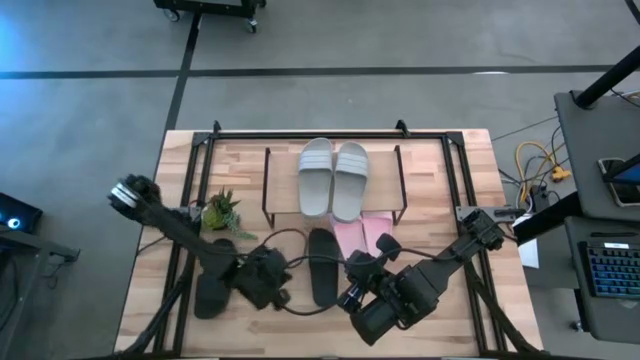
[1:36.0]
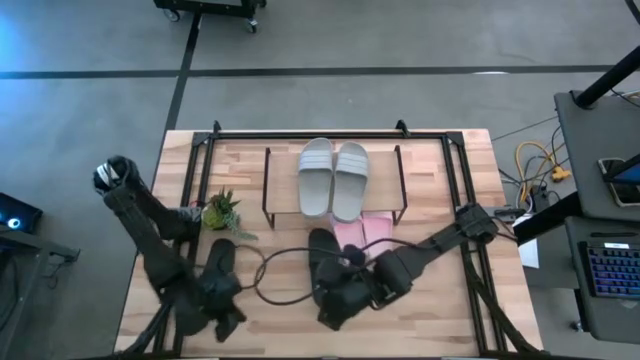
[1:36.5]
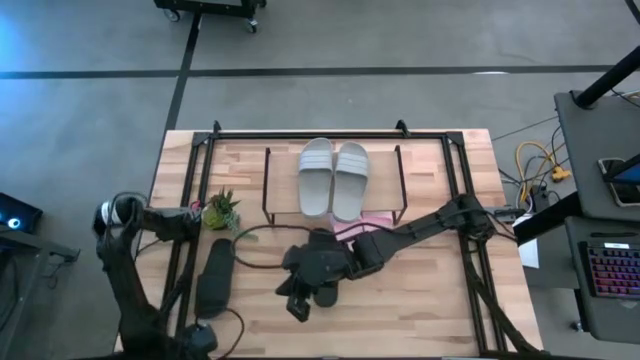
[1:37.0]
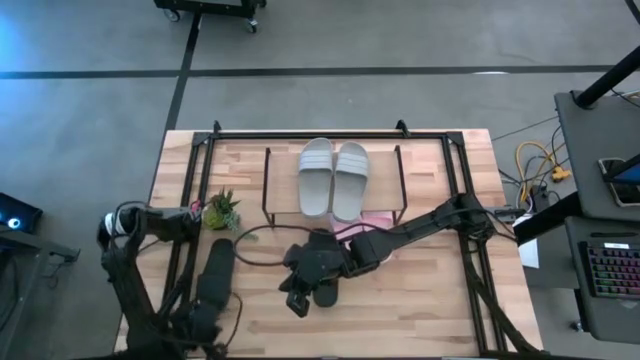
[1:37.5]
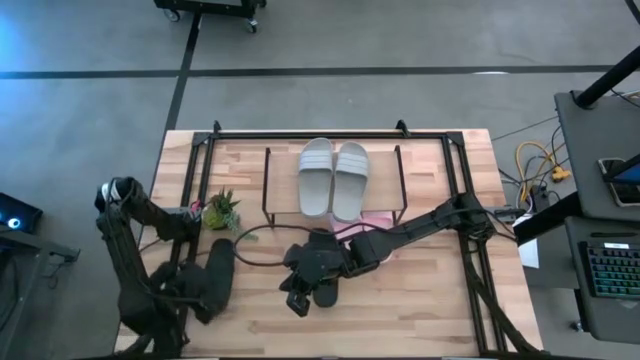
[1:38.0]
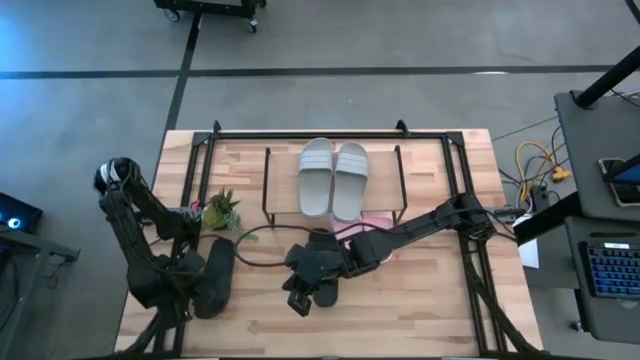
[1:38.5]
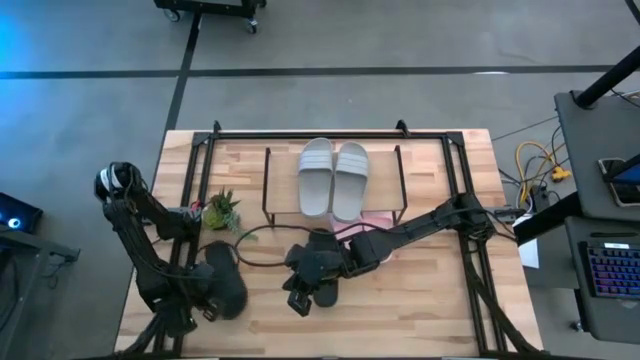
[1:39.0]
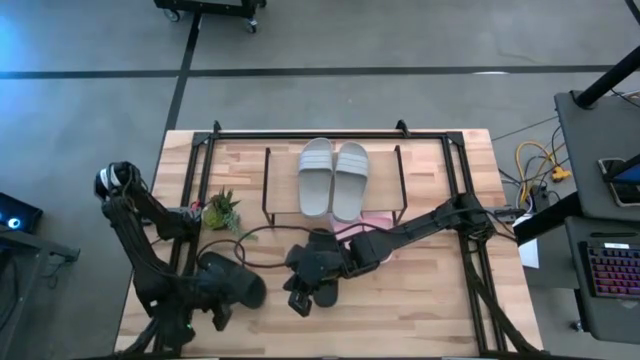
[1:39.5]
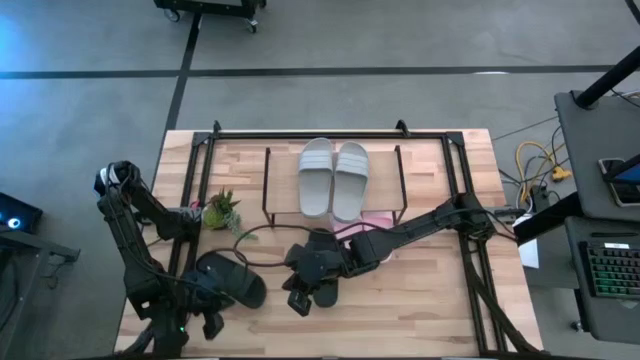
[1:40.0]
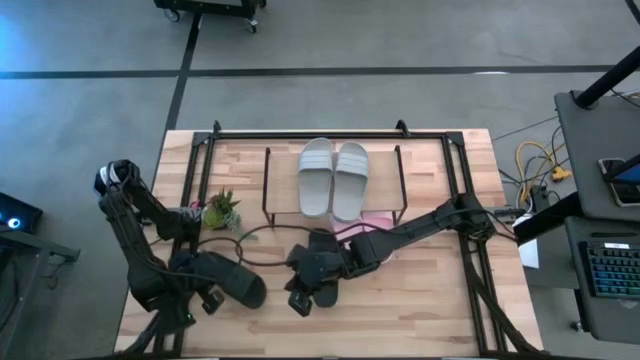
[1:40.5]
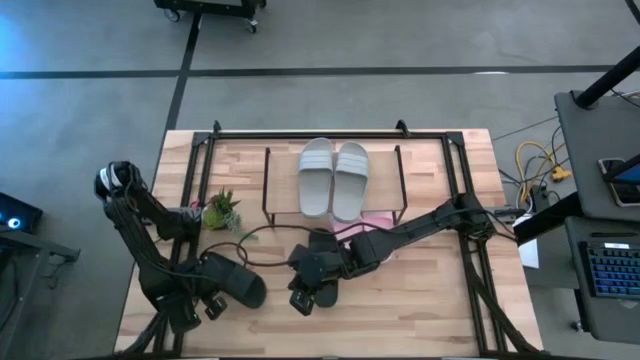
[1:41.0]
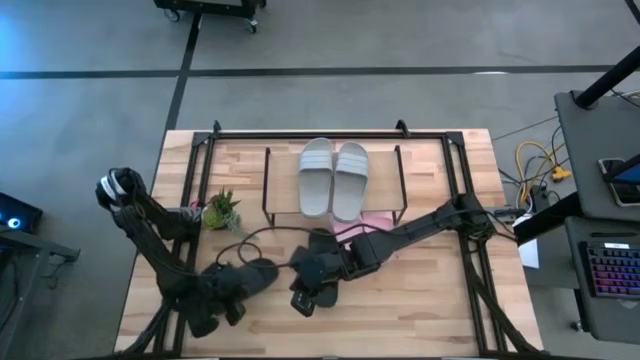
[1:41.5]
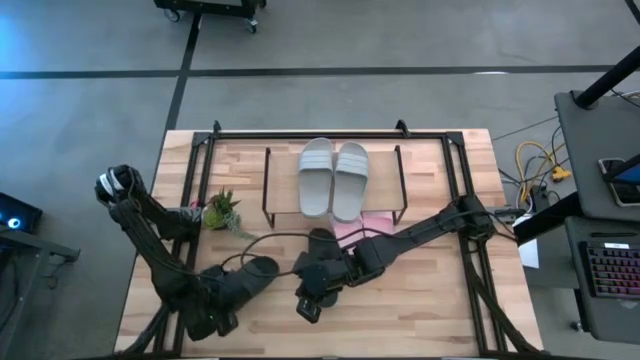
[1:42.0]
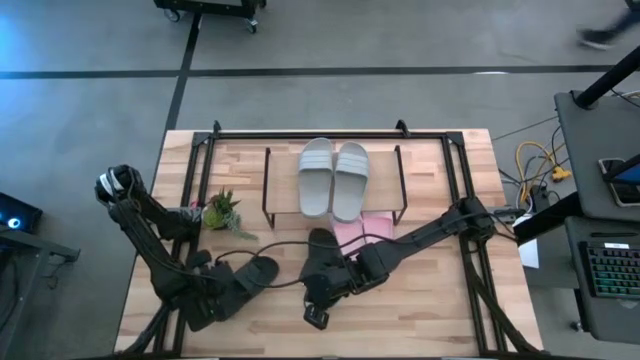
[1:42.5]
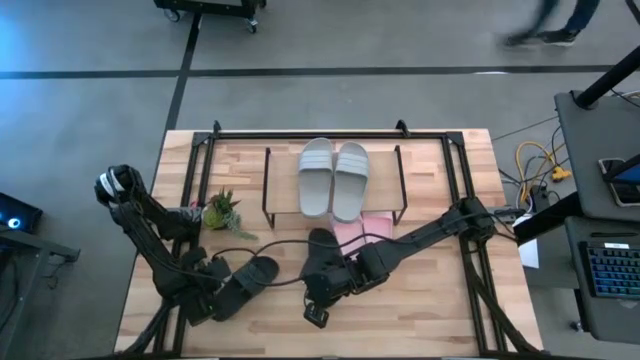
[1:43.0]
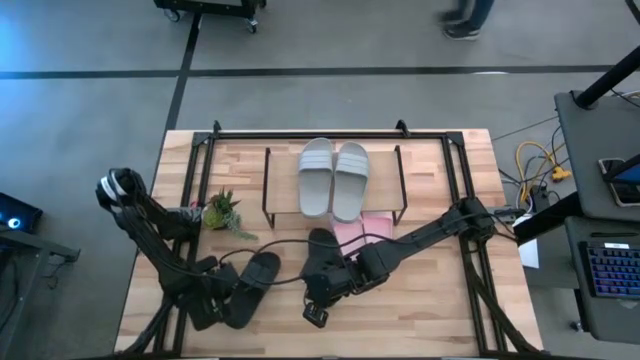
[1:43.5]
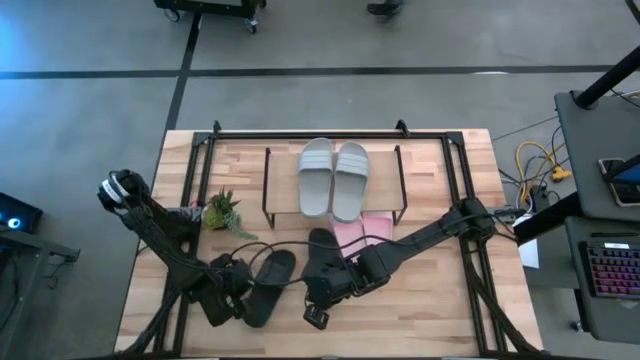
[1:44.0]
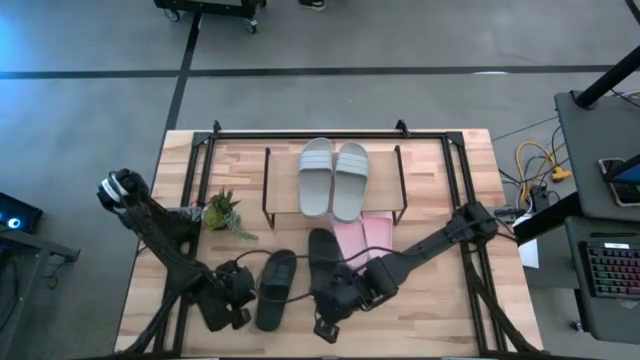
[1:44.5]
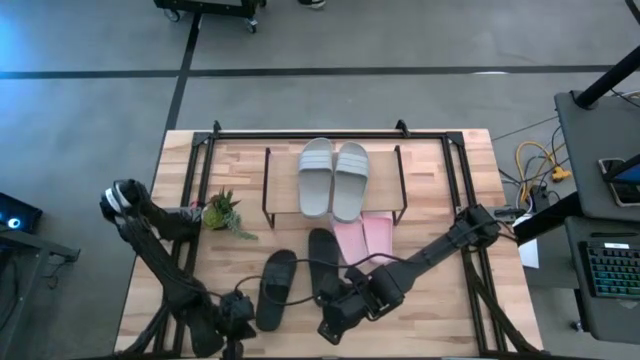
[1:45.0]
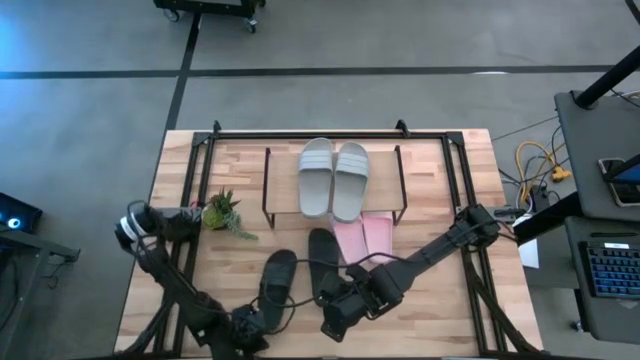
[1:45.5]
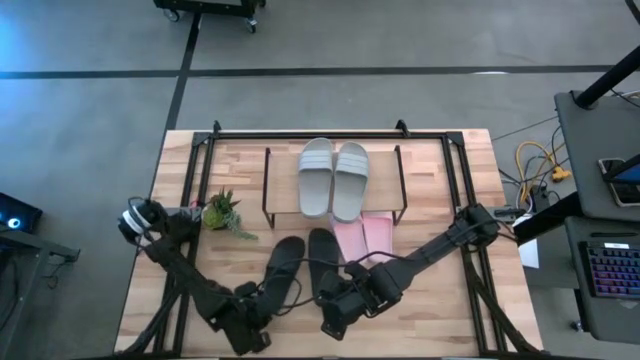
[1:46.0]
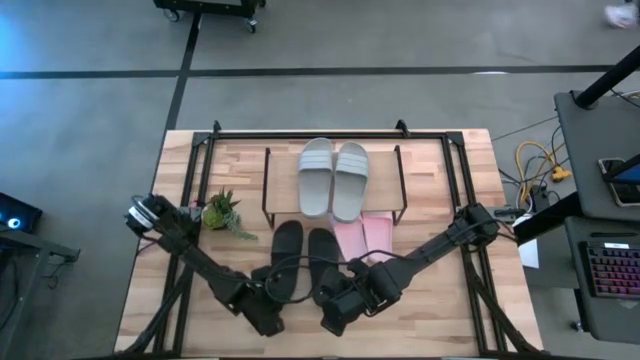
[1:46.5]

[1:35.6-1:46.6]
Task: Pick and place slides into the shelf
Move the left black slide to the center of the table

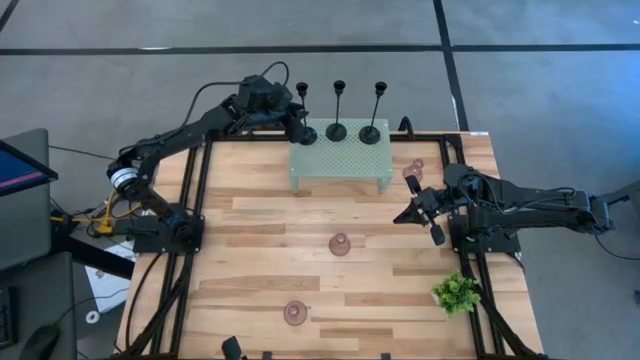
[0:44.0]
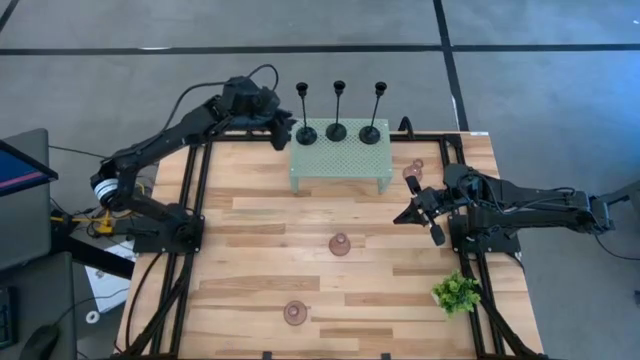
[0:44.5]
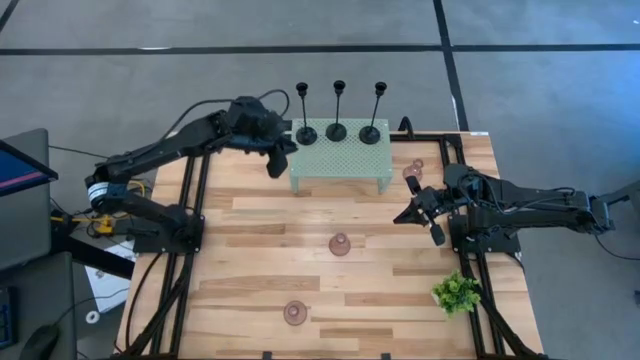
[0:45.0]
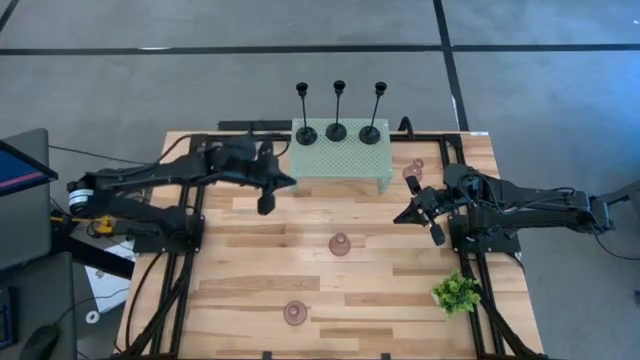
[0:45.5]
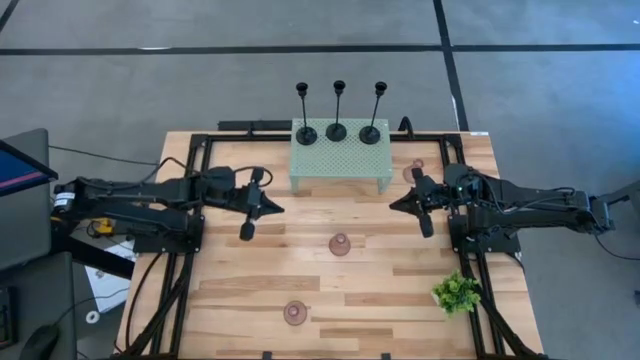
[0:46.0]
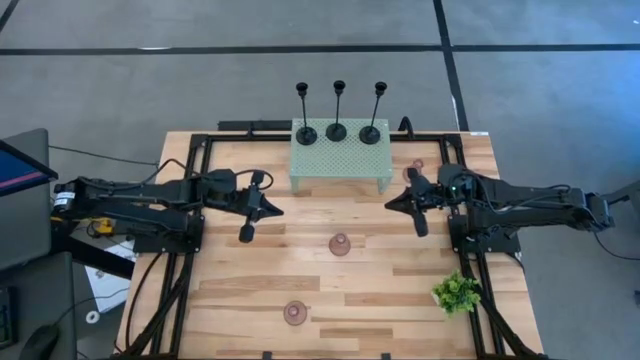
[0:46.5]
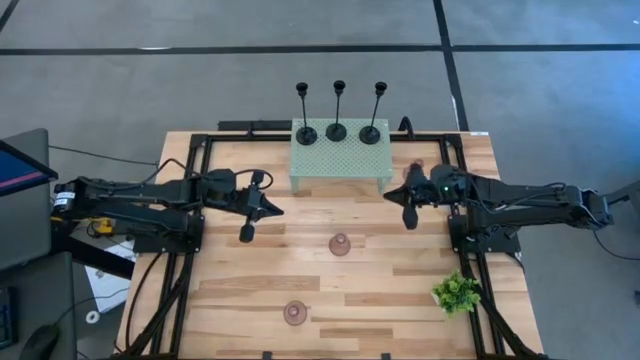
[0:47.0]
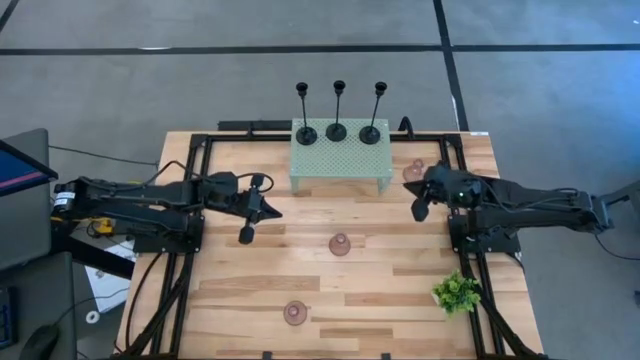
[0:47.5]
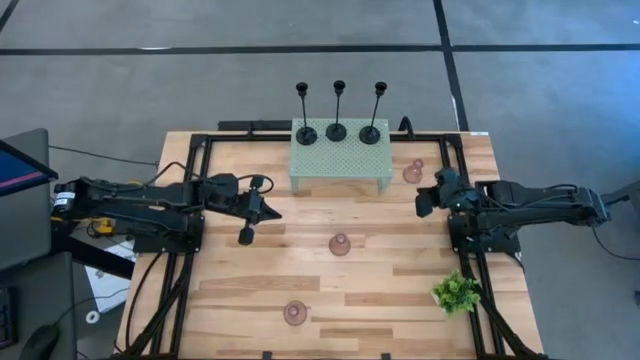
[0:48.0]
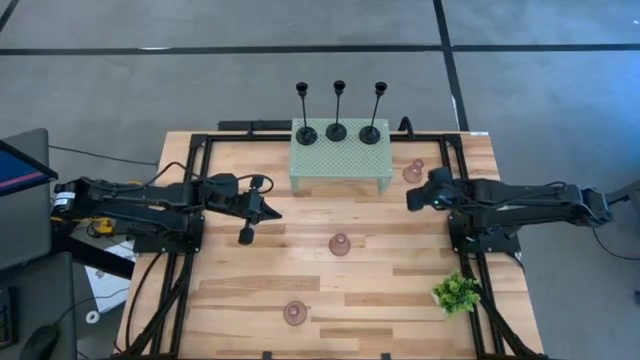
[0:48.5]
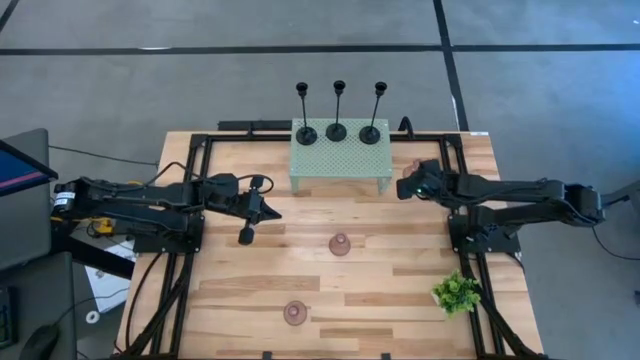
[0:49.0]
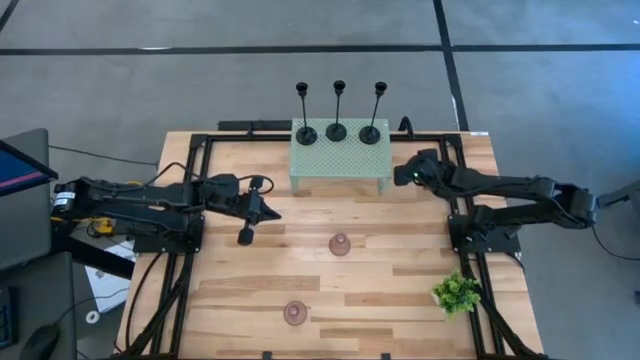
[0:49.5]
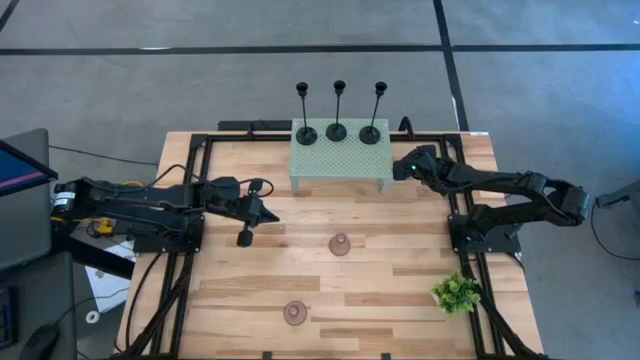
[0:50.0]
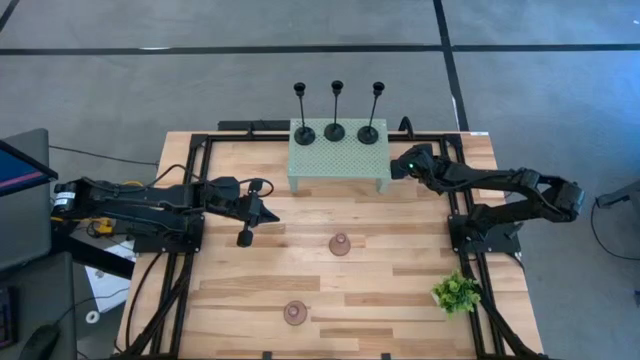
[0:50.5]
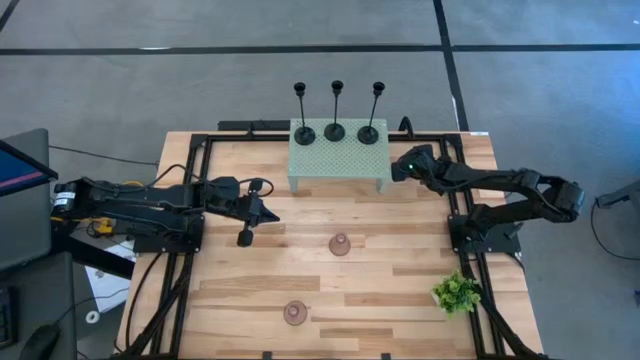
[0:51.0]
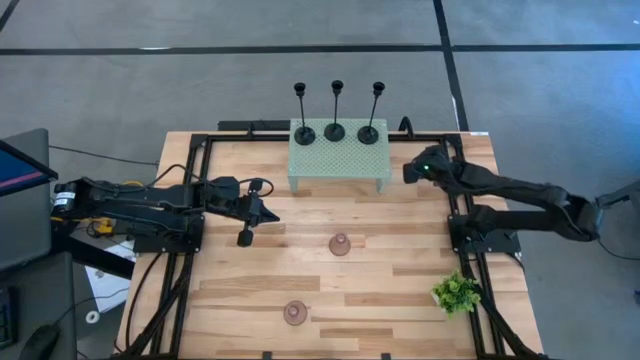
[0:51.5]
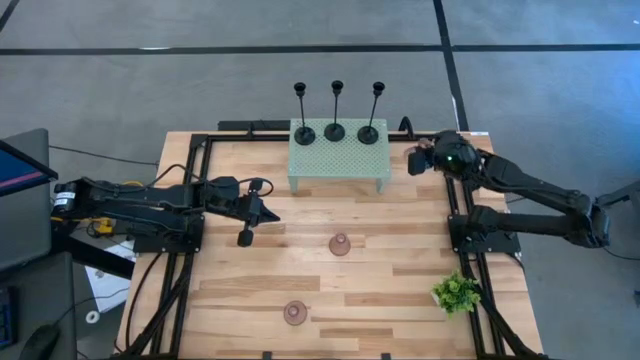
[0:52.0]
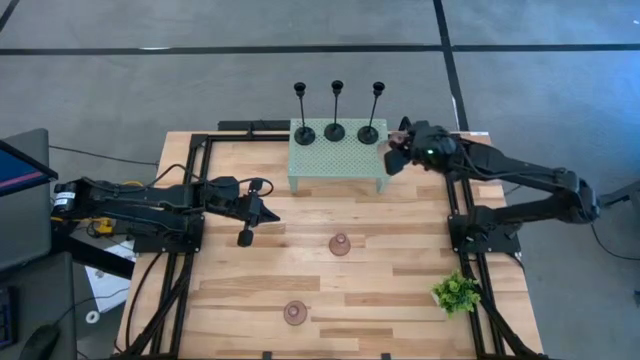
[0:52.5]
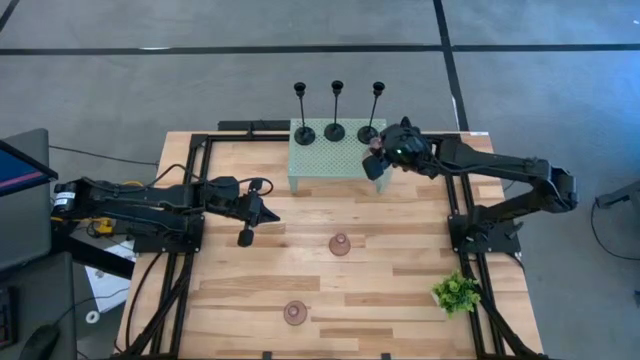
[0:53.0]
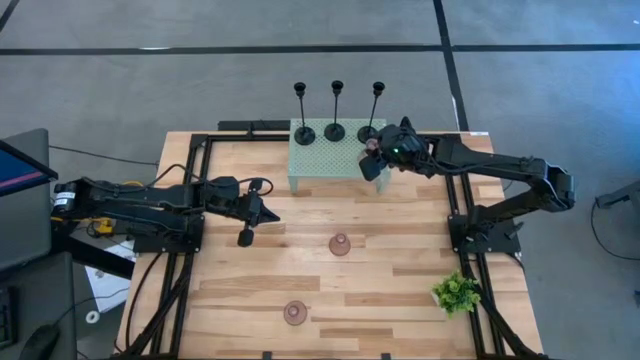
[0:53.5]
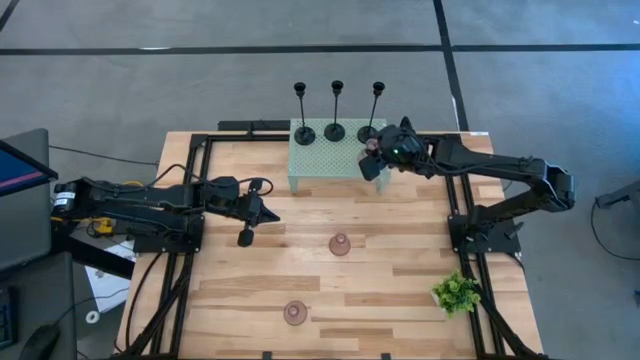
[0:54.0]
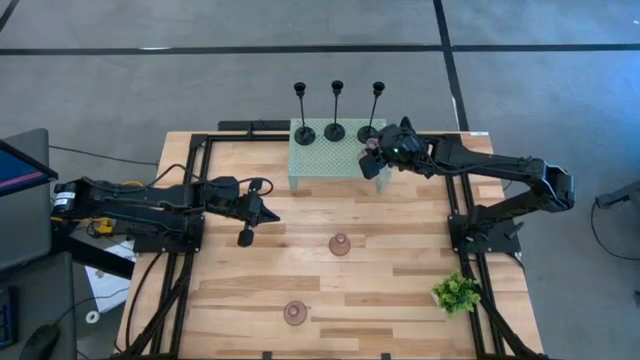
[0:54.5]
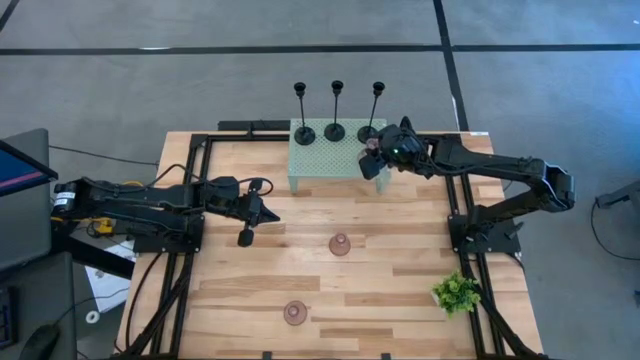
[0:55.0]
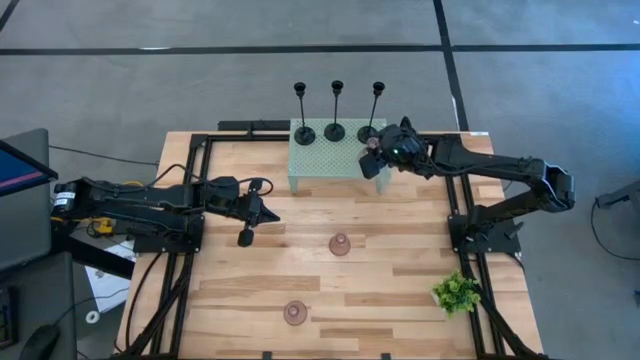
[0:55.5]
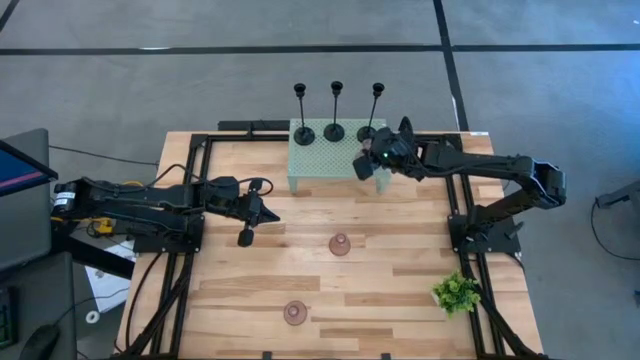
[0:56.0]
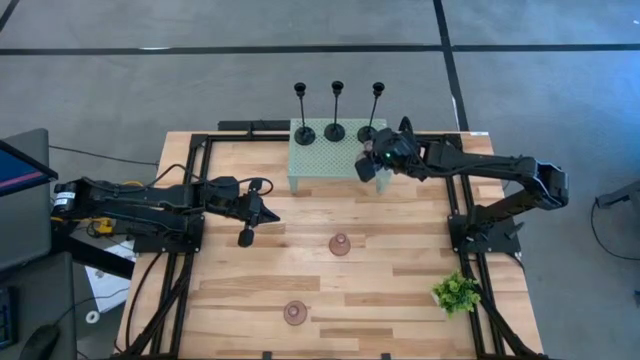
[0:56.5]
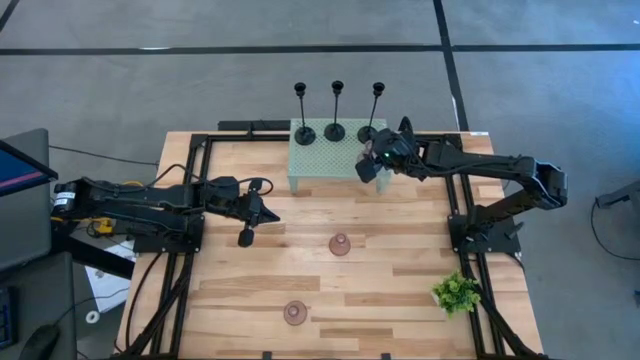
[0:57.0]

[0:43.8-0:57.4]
Task: Pick & Place candle stick holders
Put the top purple vase candle holder on the shelf
